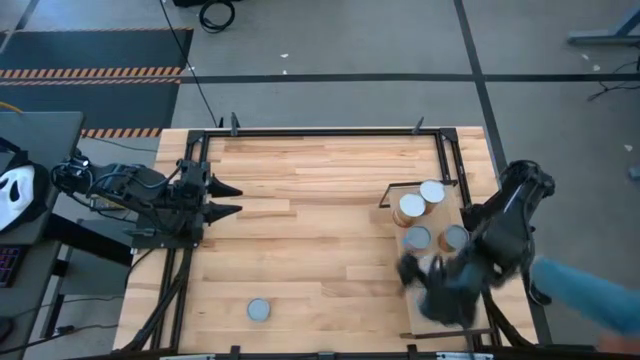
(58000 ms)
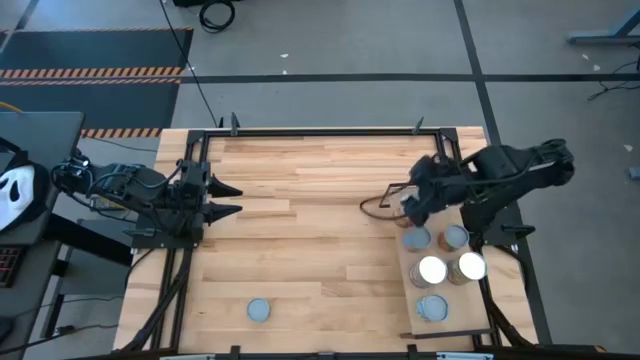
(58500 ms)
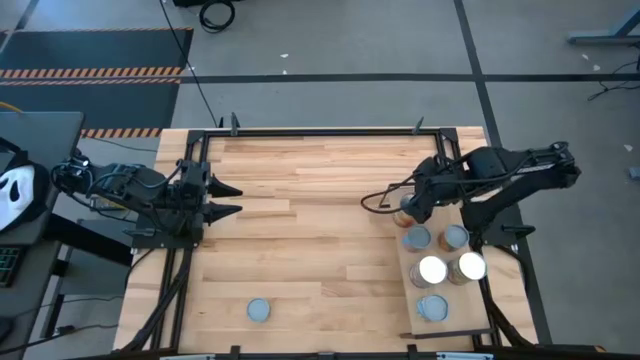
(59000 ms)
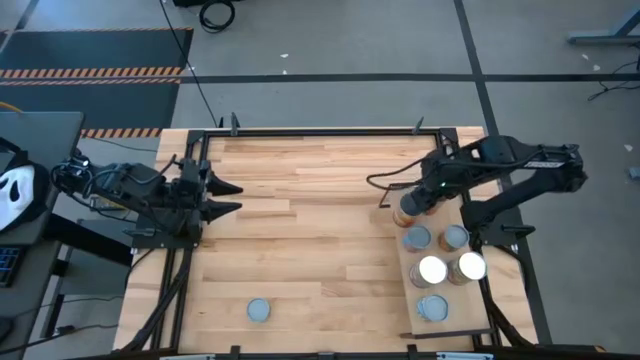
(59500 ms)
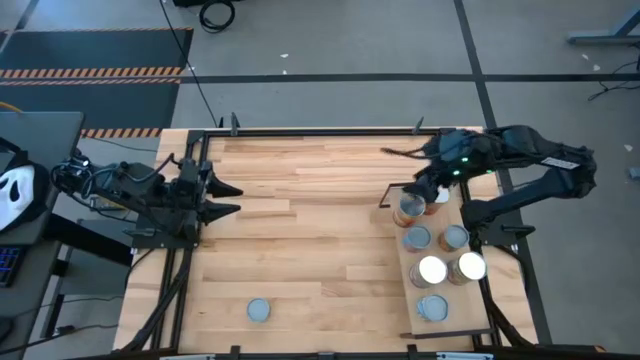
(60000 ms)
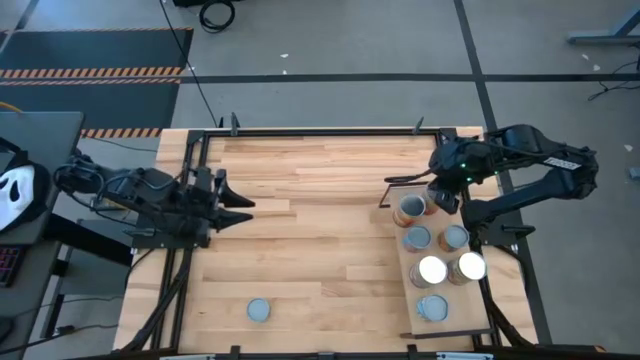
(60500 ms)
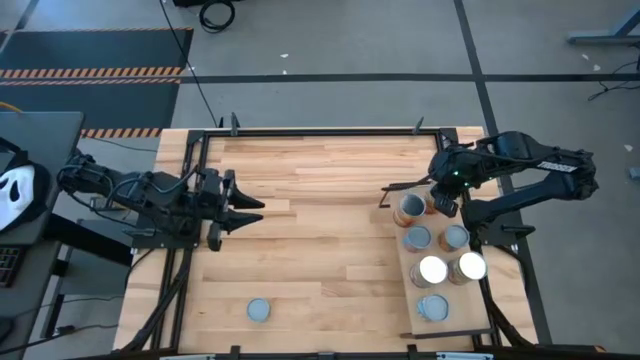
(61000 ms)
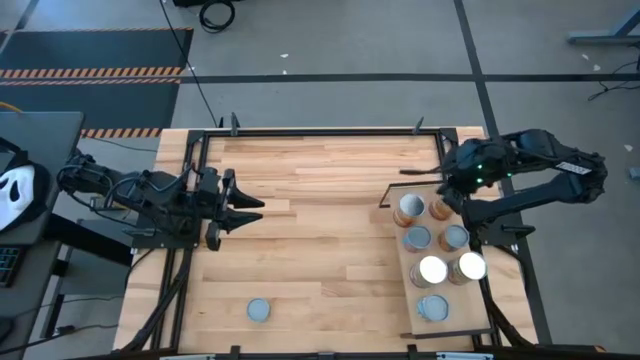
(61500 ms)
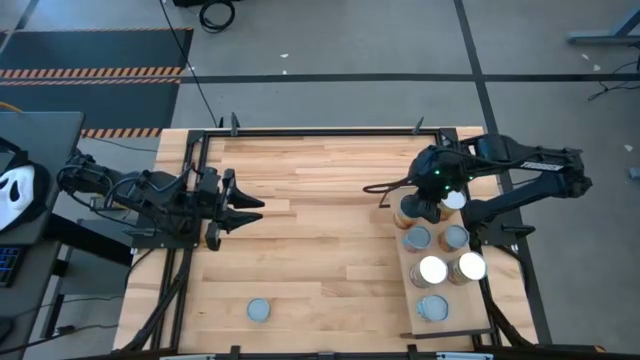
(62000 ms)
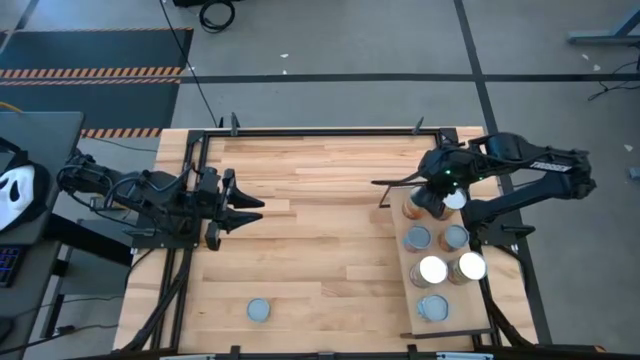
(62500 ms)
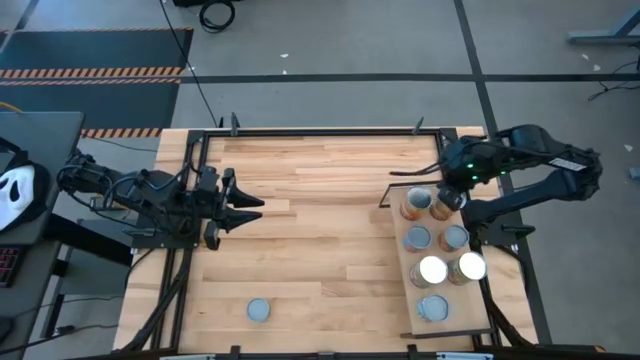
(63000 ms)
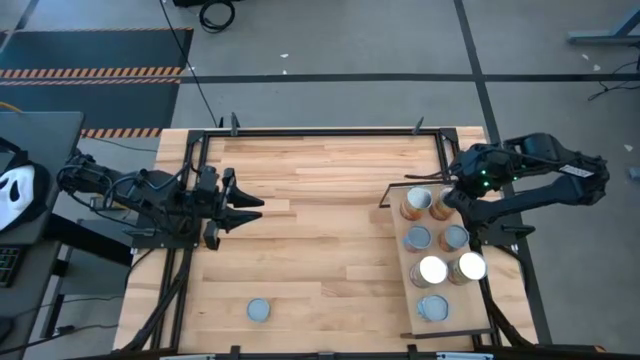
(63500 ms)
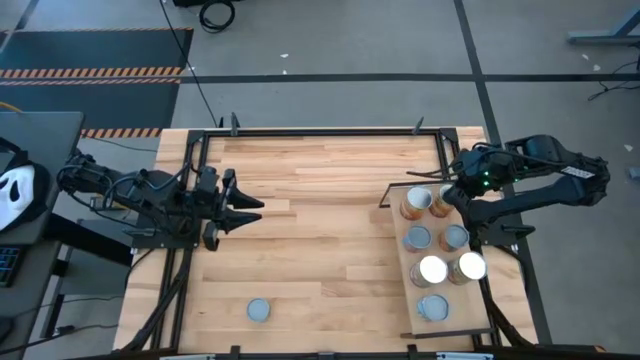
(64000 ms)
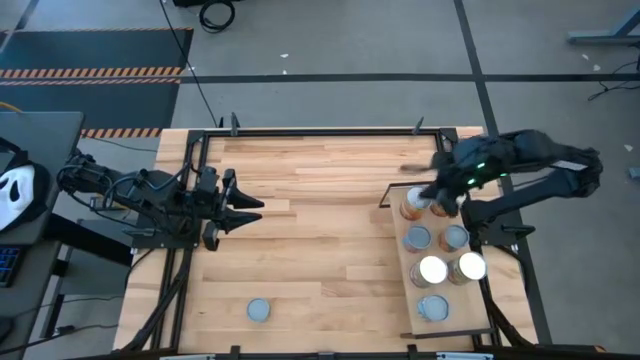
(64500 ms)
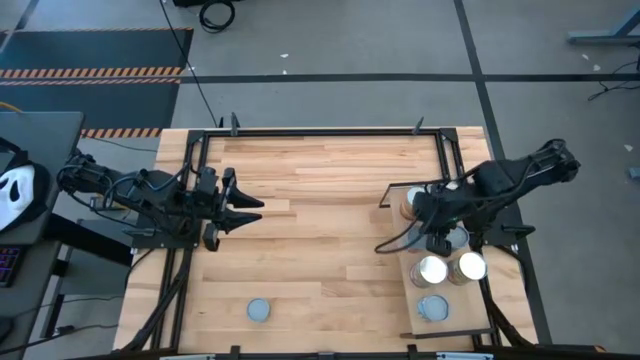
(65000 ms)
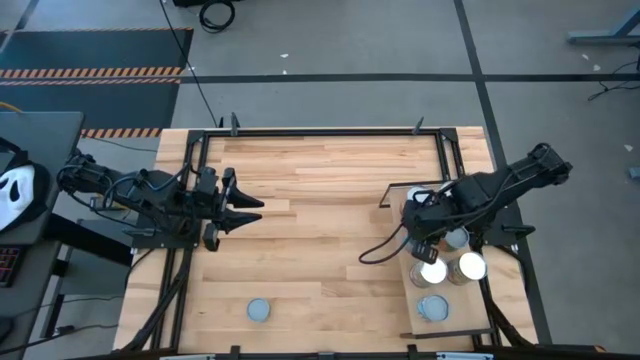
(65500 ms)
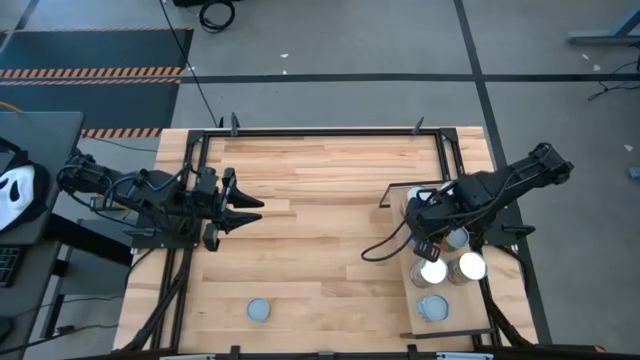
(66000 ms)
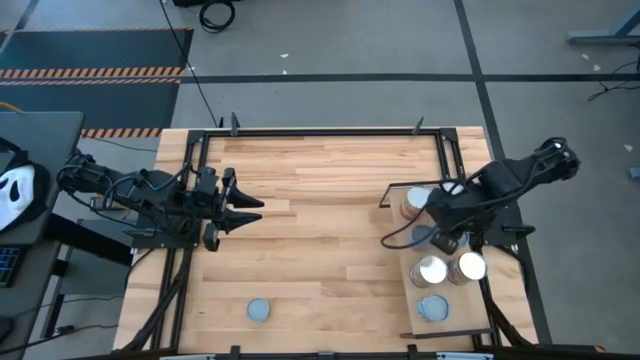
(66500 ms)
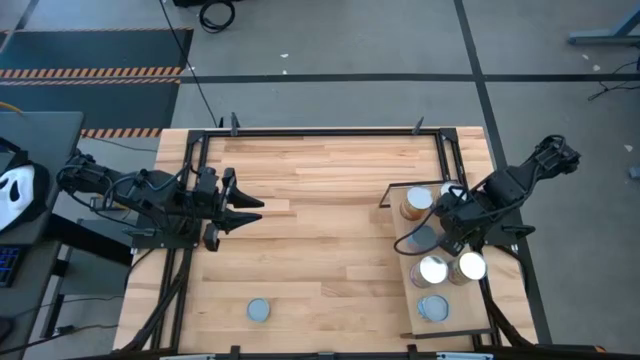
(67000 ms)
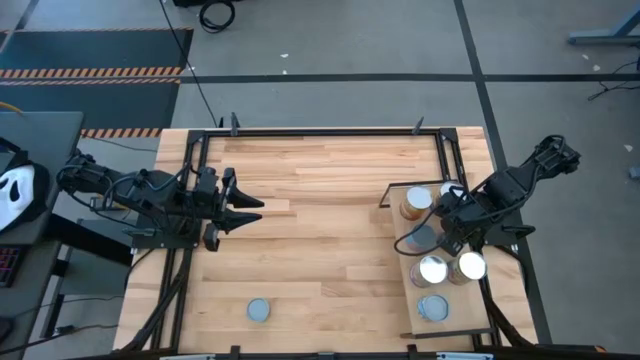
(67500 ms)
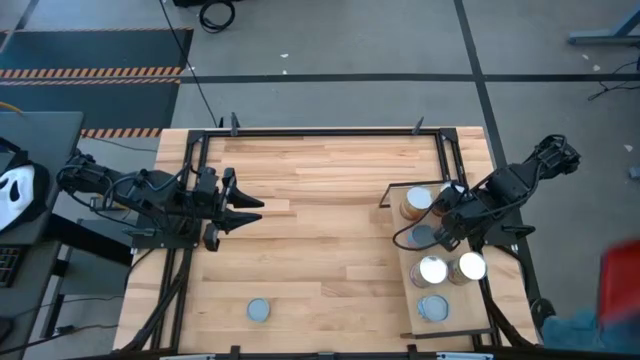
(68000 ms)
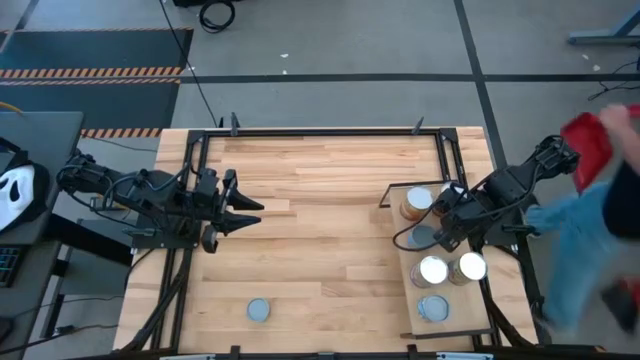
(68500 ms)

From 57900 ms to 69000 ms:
Task: Pick and place cans onto a shelf
Adjust the cans on the shelf

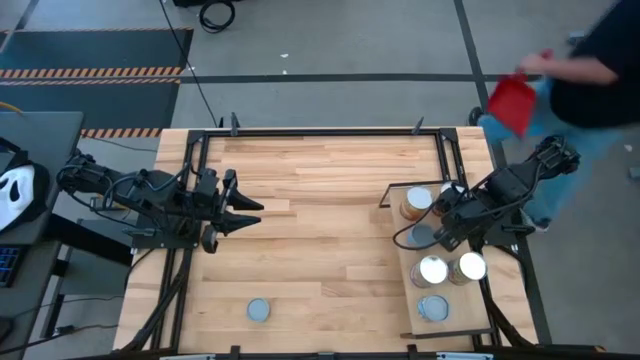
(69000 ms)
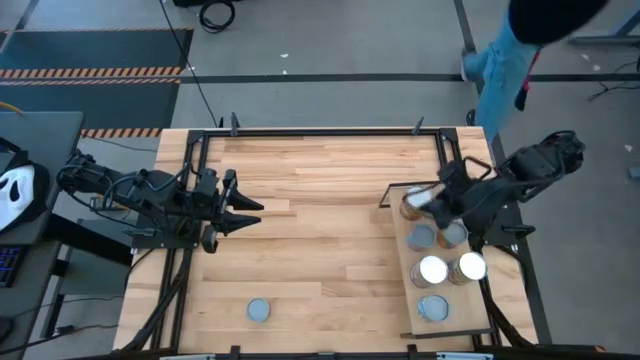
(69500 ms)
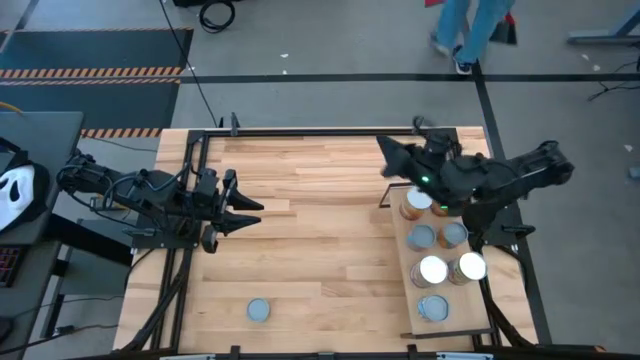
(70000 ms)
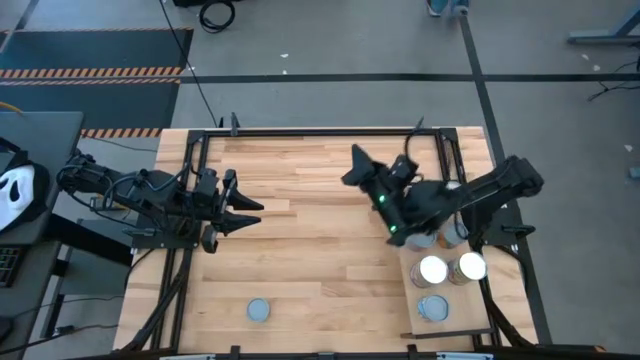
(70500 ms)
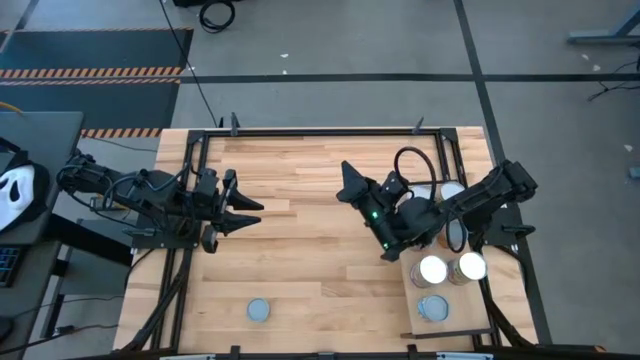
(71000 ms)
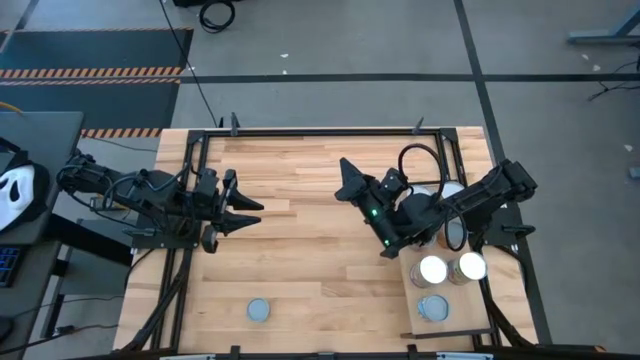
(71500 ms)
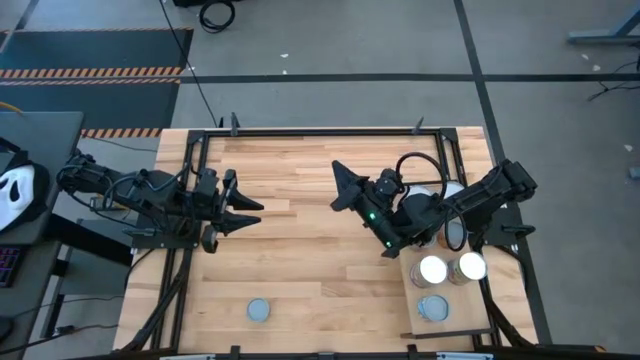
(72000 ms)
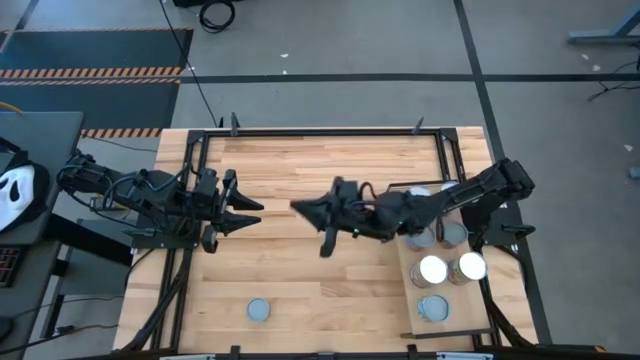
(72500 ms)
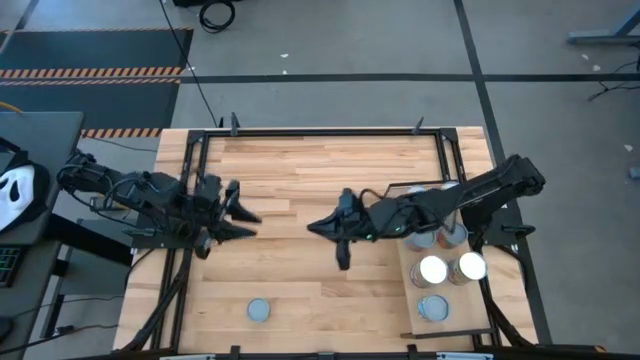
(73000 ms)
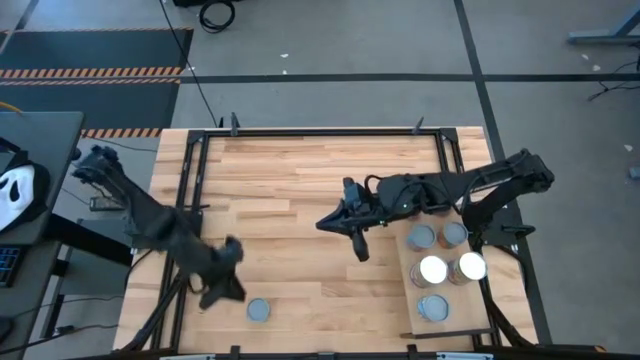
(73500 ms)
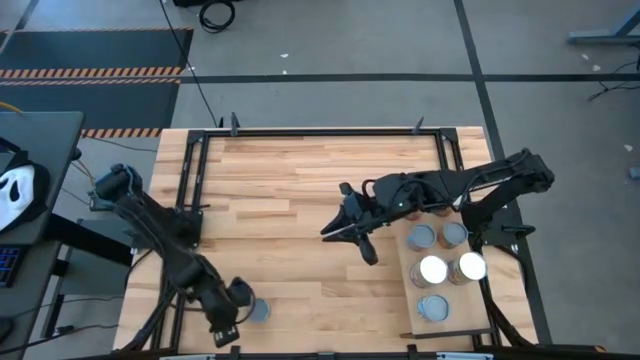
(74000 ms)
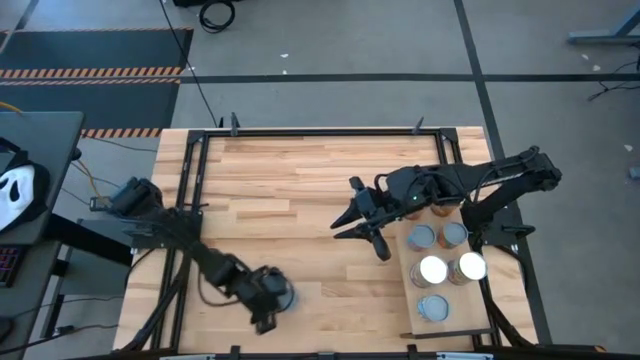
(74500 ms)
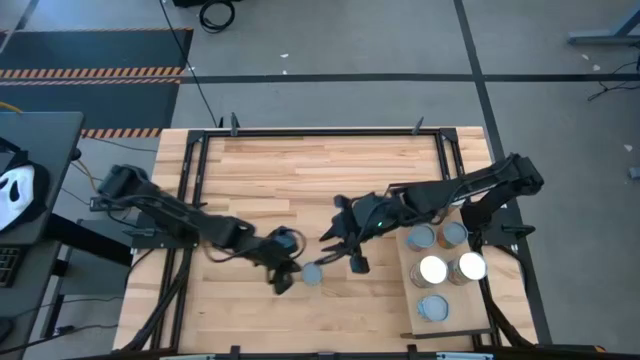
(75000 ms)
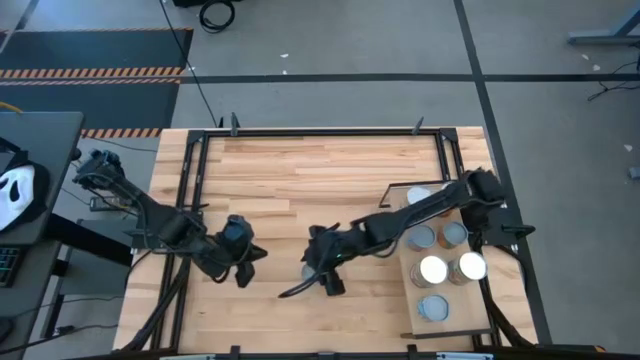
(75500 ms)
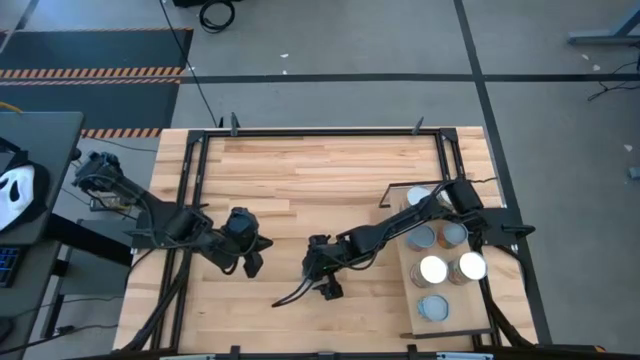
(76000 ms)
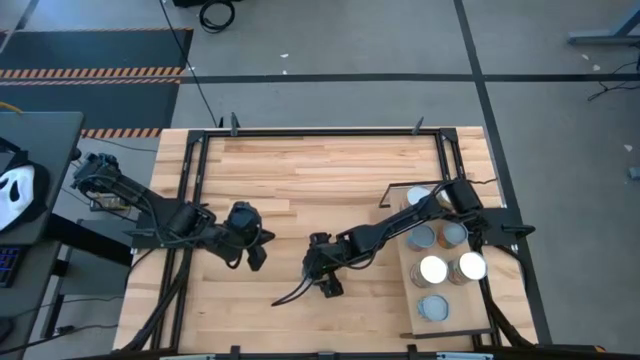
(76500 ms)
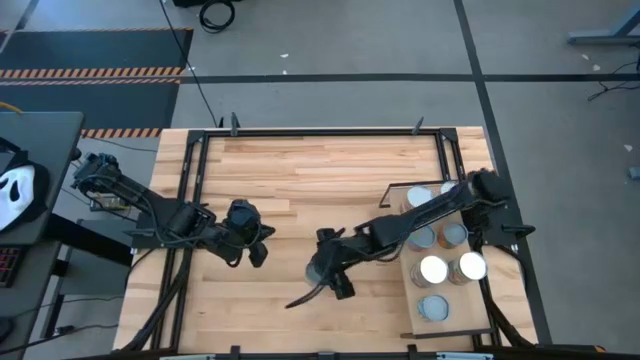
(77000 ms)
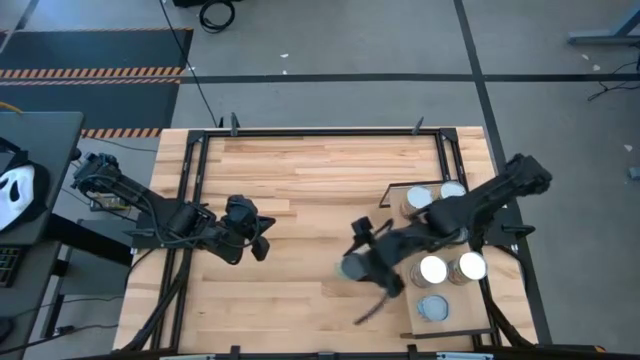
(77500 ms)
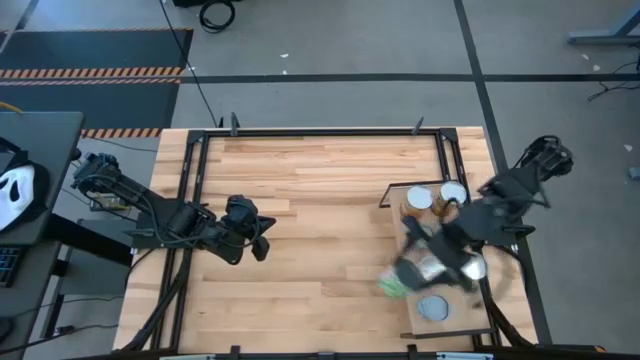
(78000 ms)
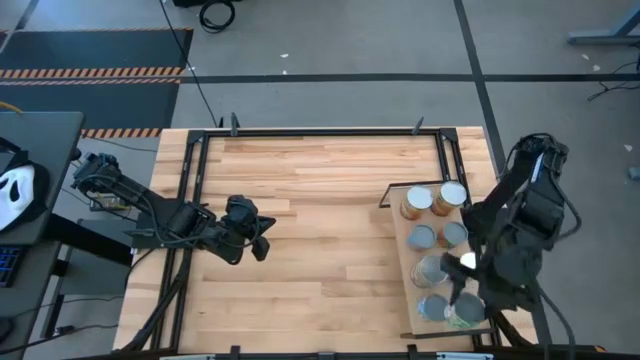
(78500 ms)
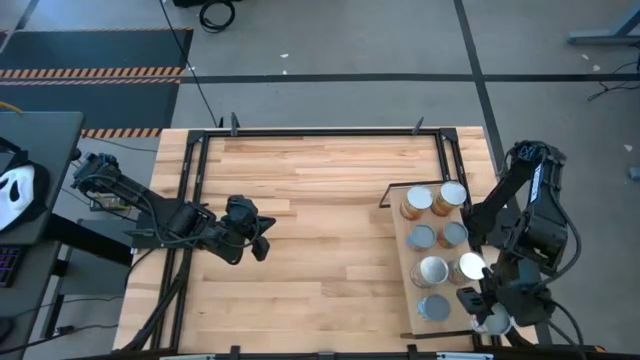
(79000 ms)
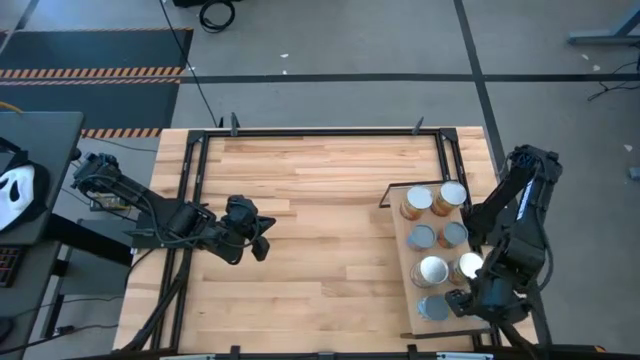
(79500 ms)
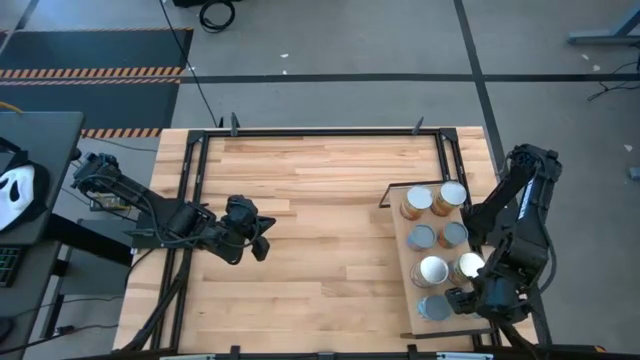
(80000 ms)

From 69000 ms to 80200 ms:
Put the canned peas on the shelf
